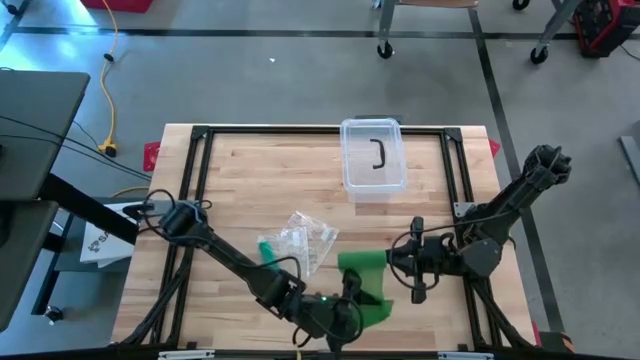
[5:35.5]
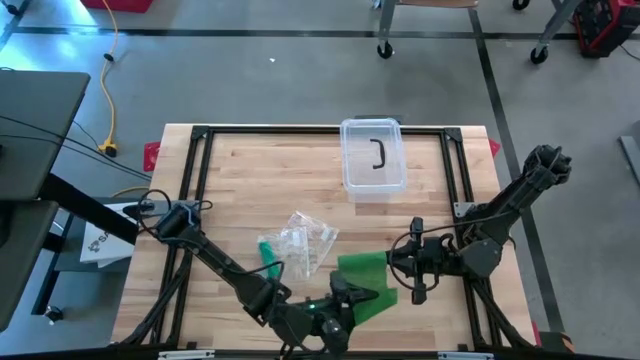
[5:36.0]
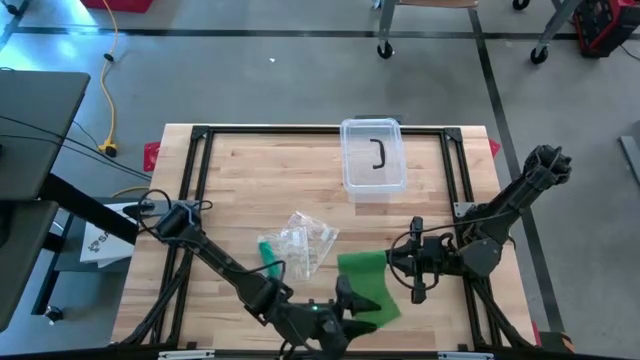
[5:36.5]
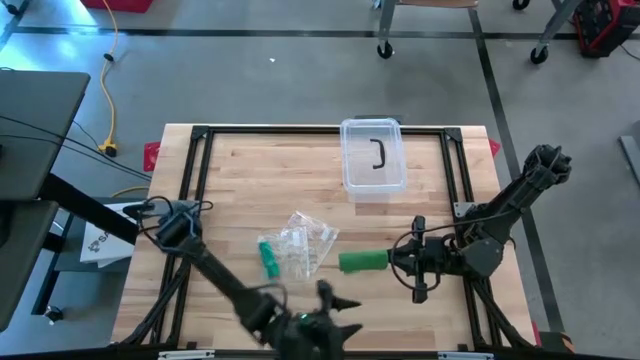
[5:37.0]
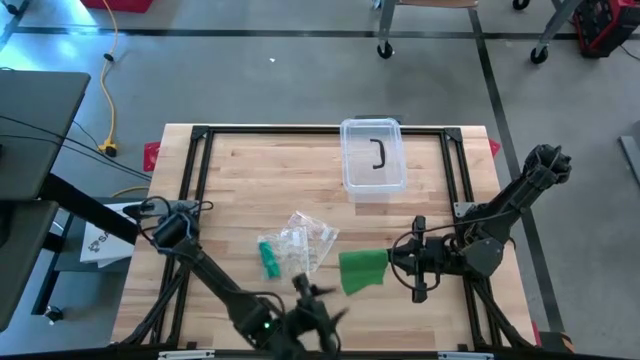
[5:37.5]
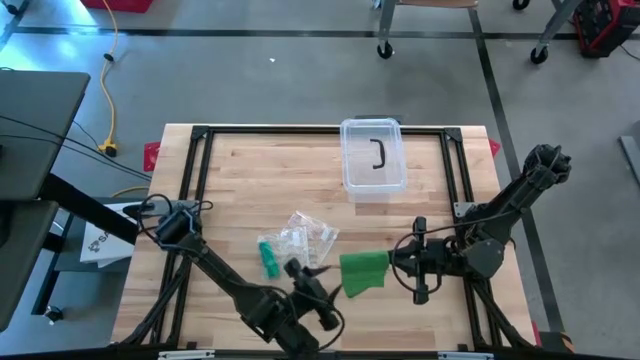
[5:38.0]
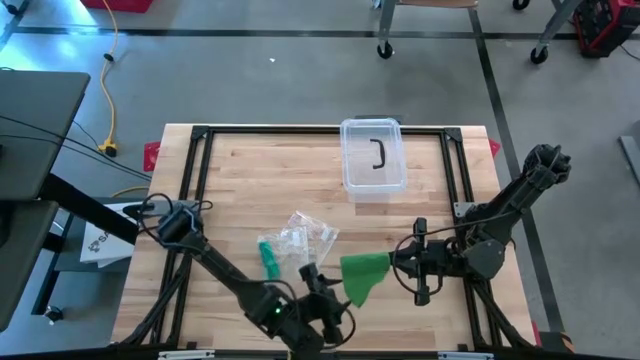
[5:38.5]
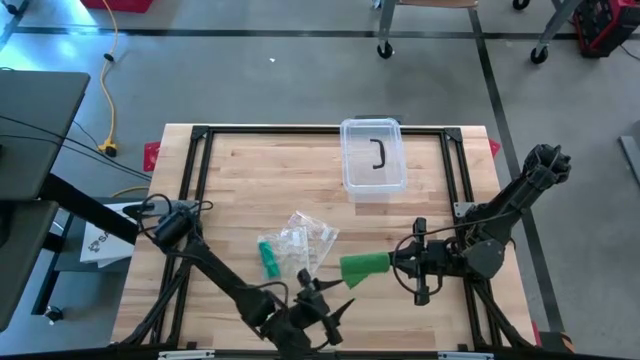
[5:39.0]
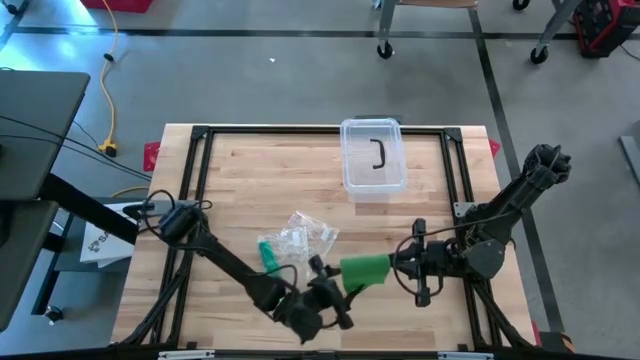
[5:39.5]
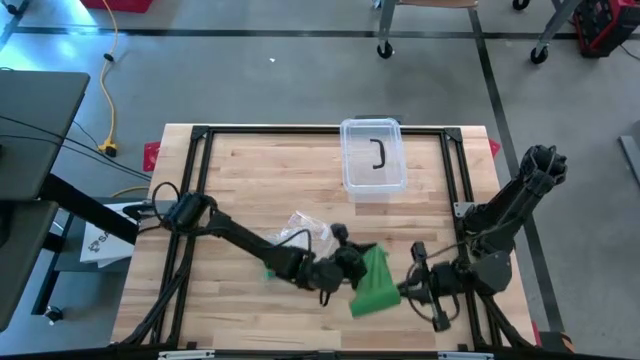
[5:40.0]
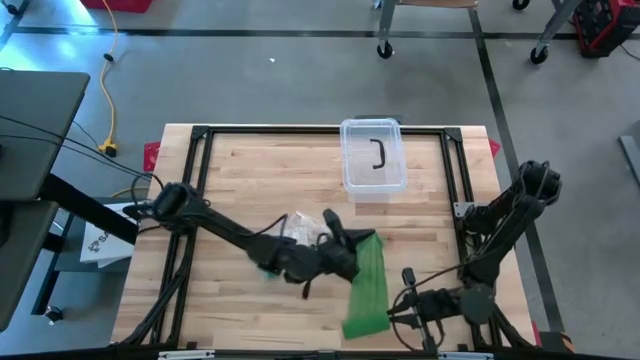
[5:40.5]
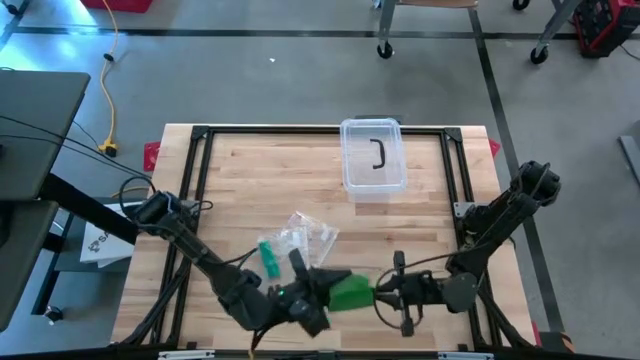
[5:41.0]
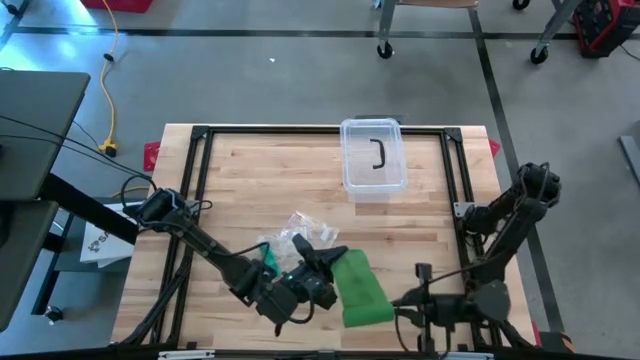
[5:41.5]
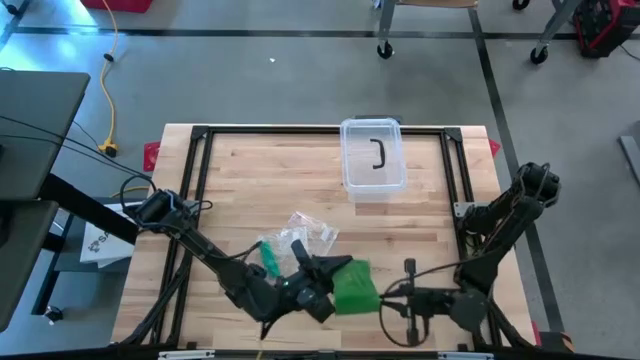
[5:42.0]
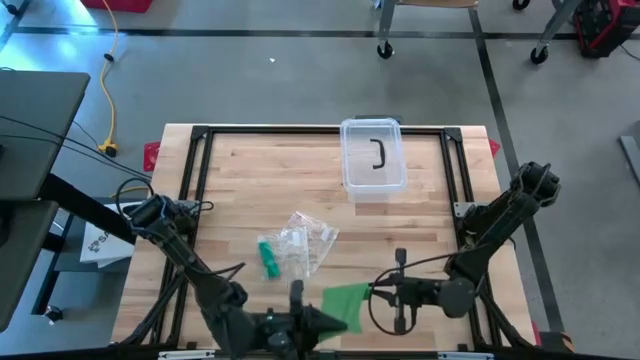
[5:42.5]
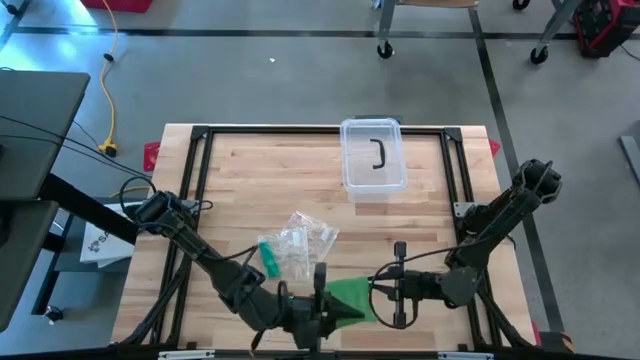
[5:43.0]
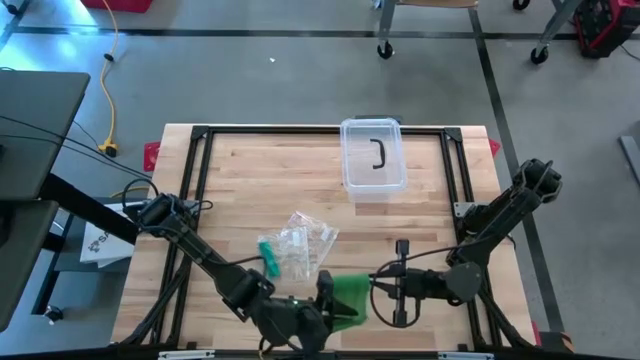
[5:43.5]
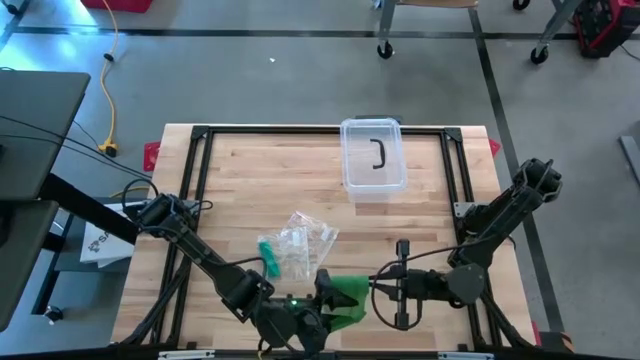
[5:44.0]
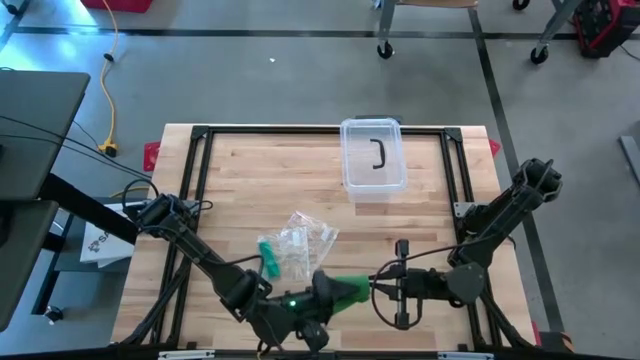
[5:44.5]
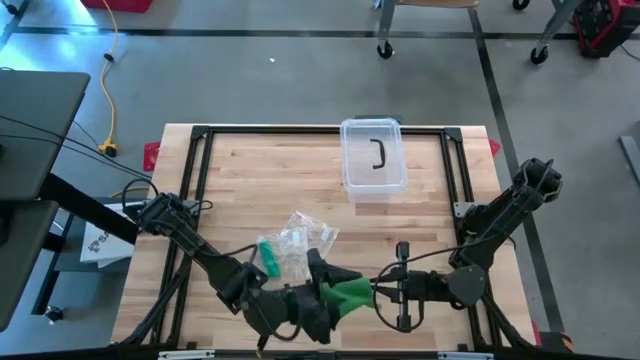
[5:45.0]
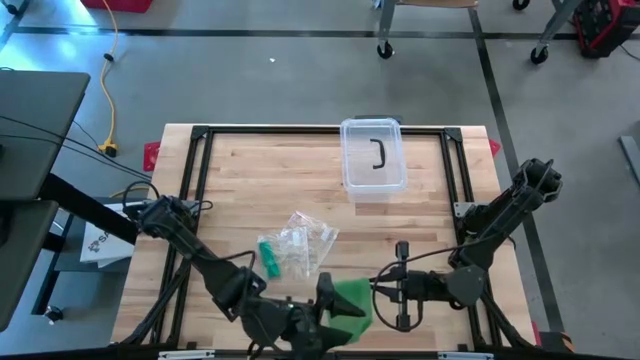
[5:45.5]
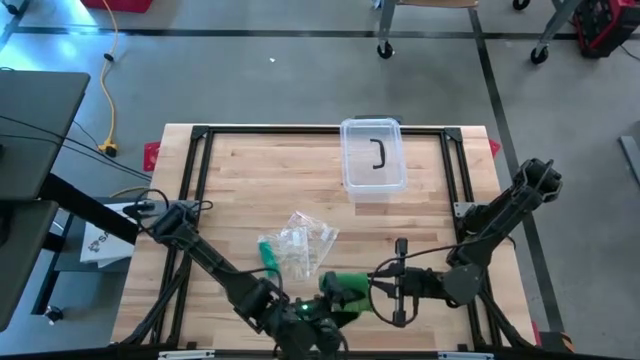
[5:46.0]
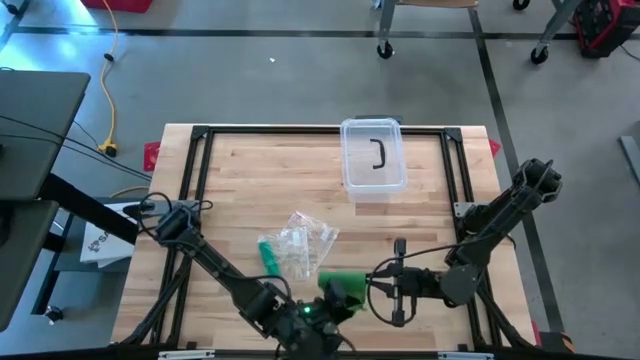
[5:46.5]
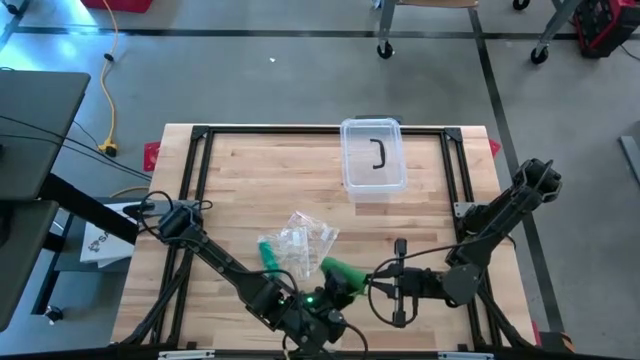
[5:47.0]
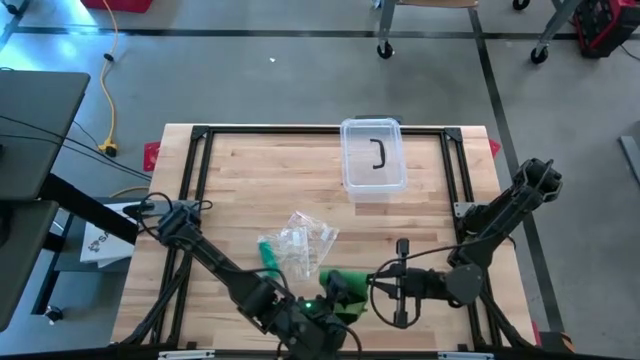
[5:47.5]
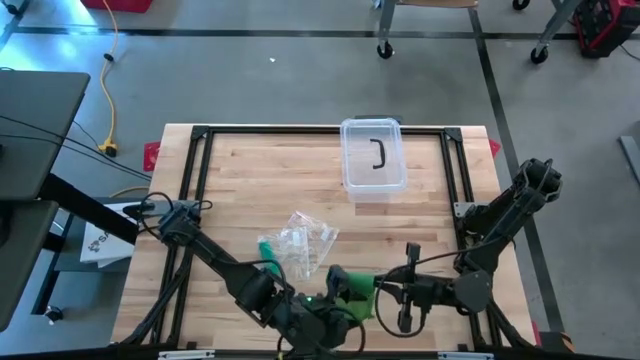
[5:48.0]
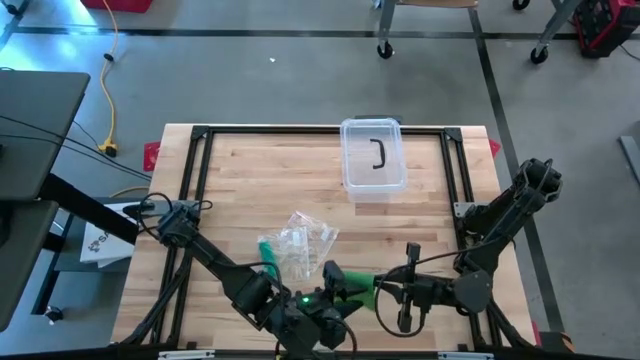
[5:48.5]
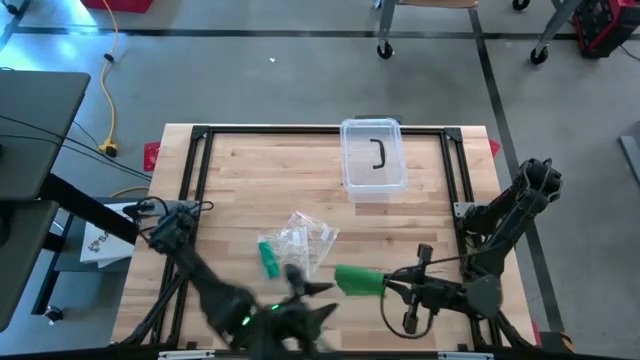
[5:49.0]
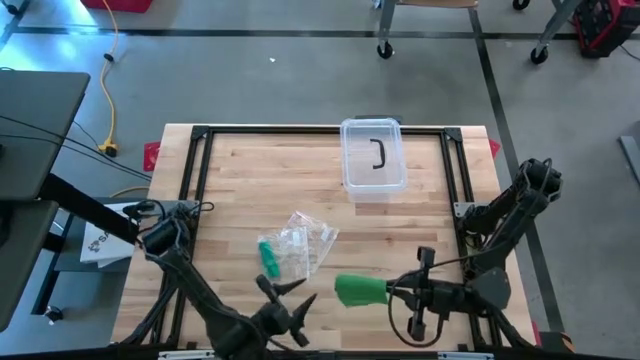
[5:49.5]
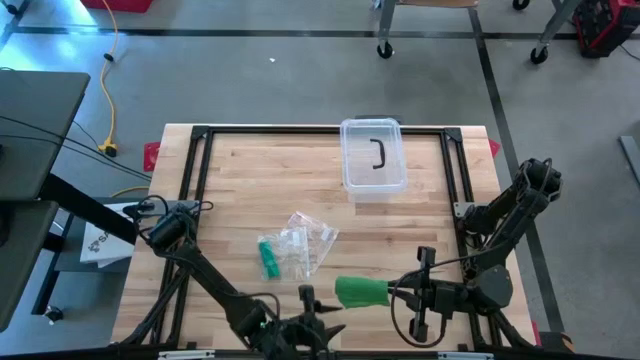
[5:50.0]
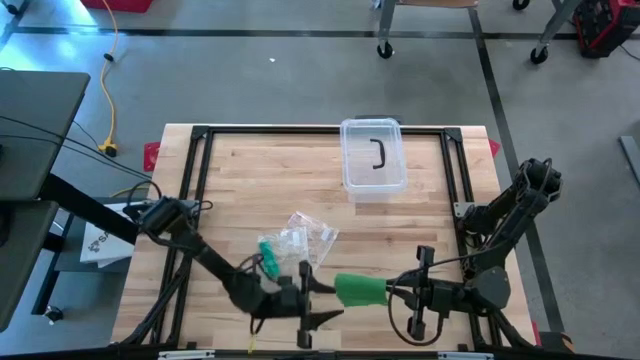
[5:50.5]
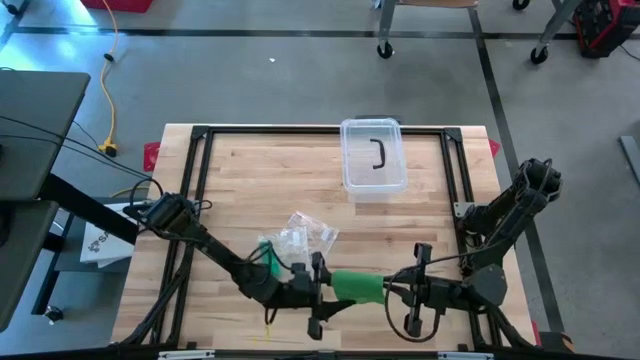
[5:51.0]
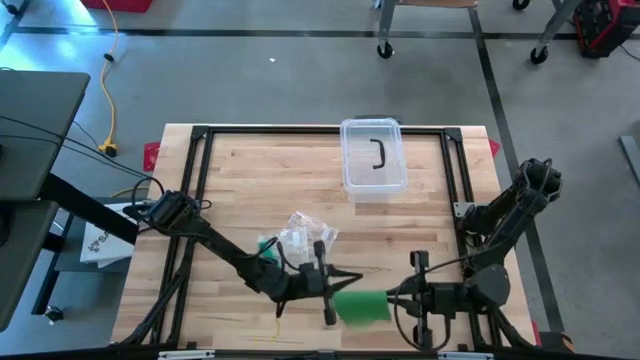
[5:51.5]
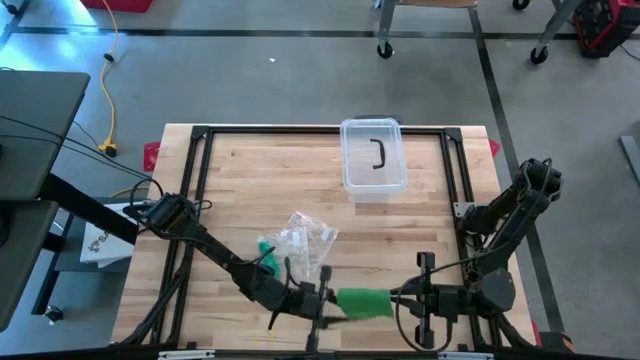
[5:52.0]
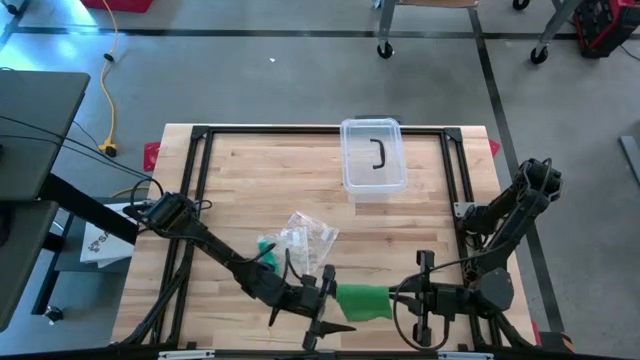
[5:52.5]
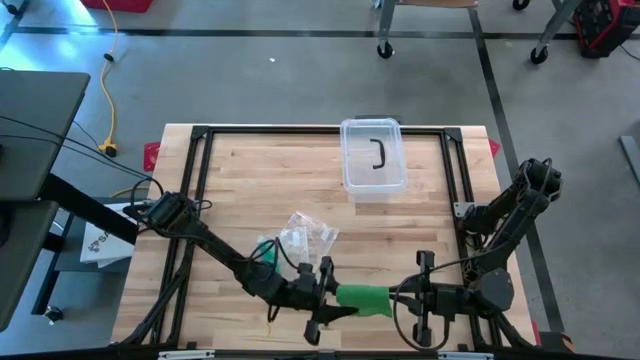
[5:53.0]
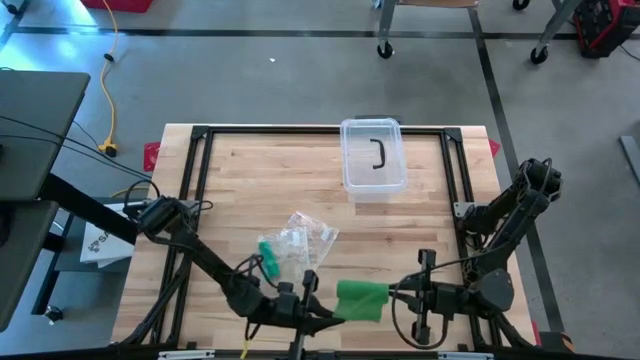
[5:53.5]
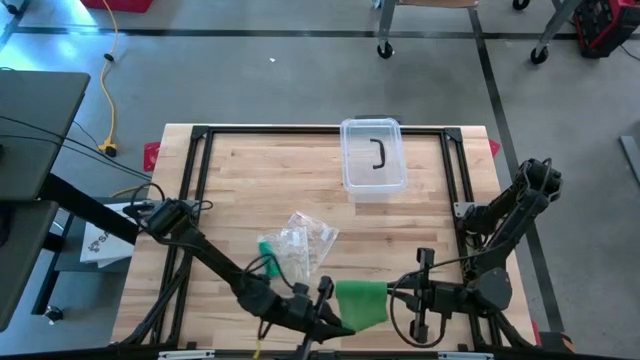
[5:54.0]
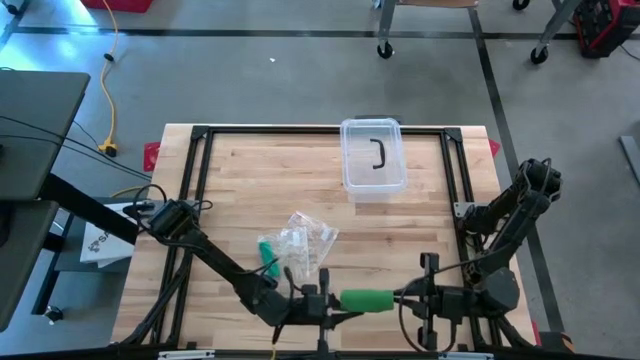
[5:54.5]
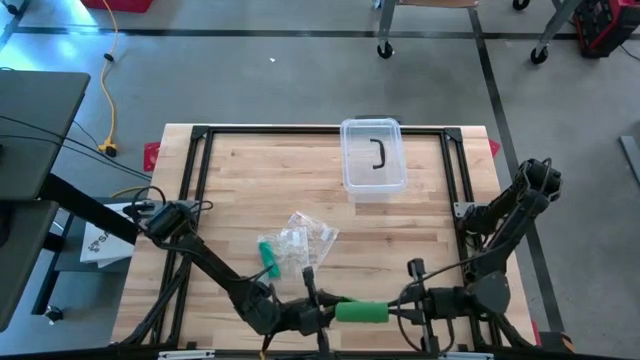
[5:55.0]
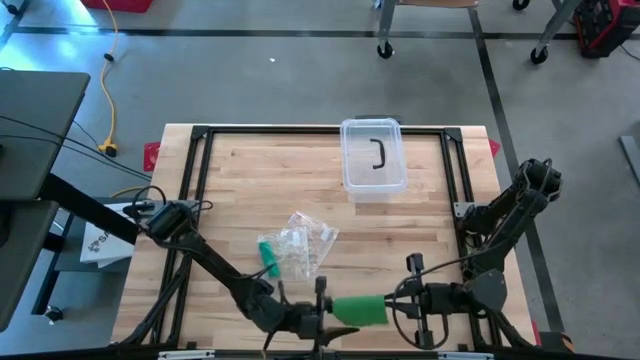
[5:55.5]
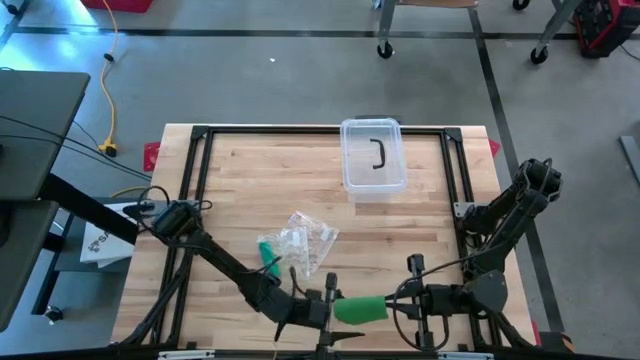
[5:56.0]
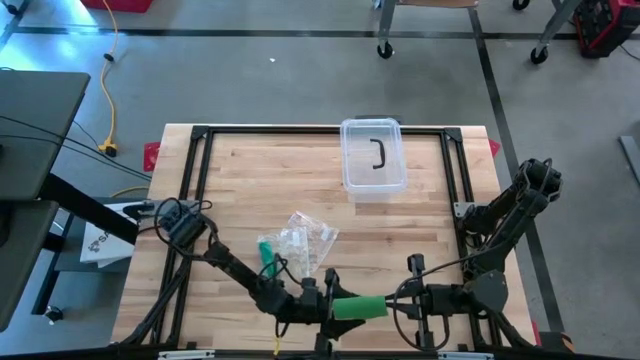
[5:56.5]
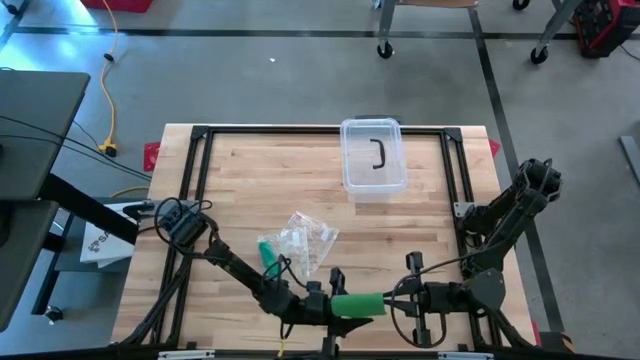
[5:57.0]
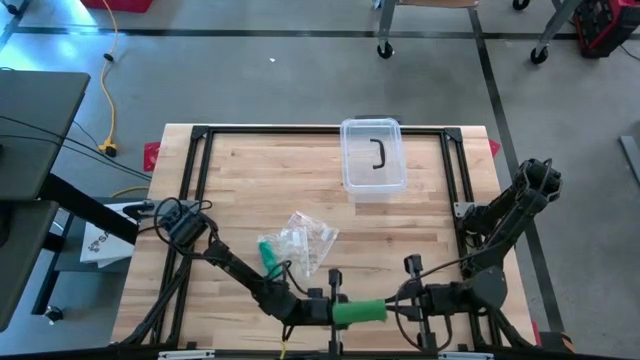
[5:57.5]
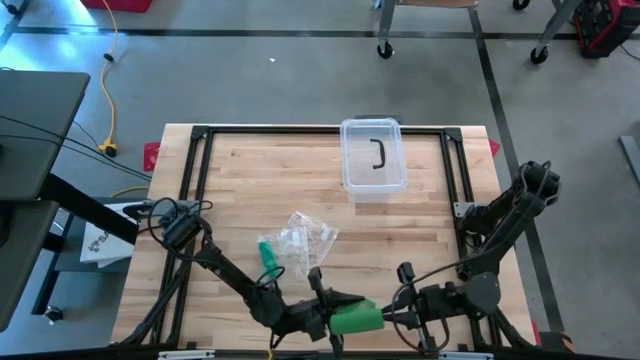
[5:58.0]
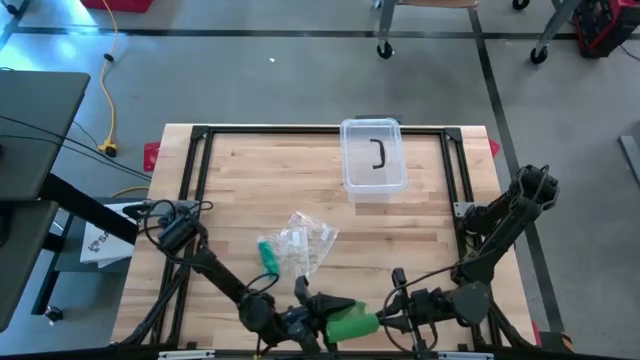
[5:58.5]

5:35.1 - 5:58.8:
Task: Roll bandage
Roll the green bandage
